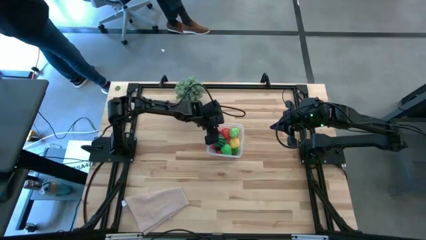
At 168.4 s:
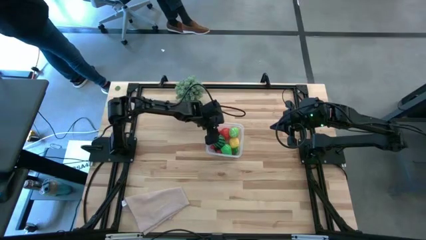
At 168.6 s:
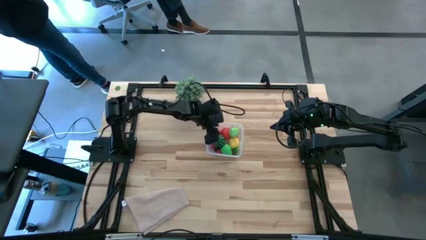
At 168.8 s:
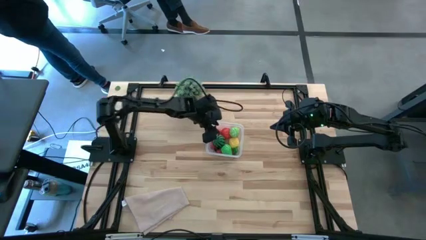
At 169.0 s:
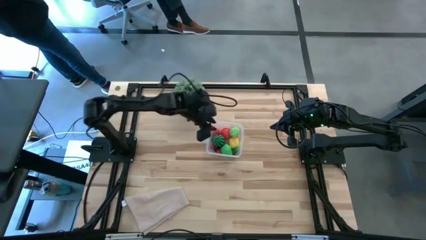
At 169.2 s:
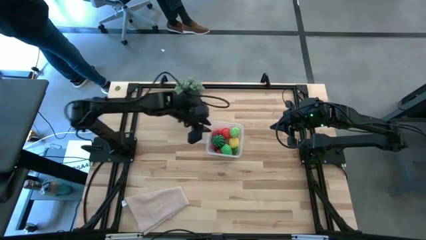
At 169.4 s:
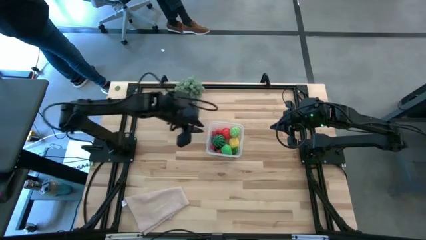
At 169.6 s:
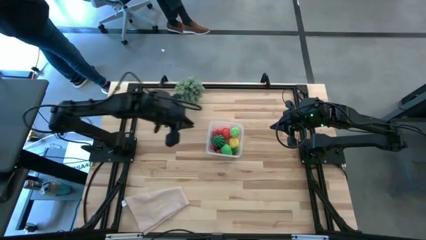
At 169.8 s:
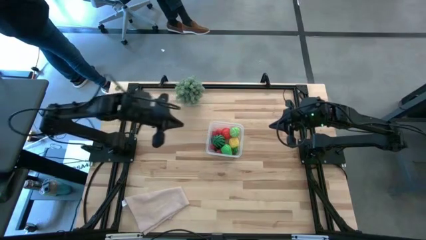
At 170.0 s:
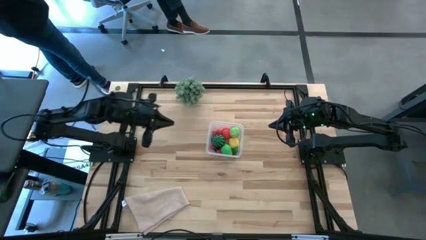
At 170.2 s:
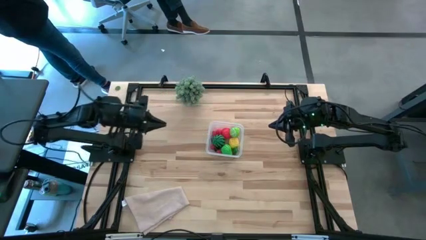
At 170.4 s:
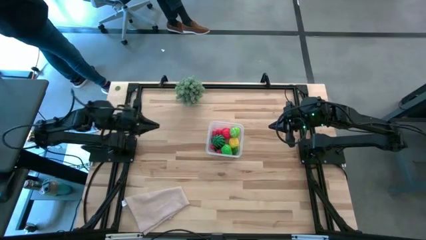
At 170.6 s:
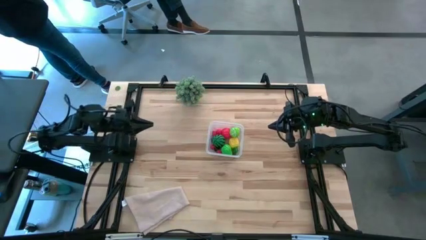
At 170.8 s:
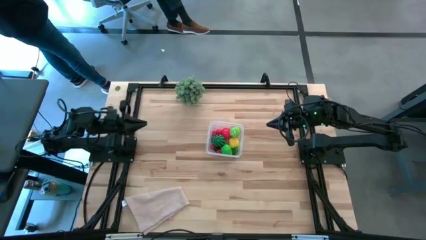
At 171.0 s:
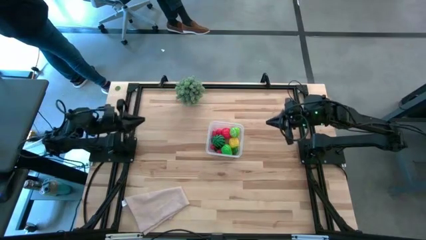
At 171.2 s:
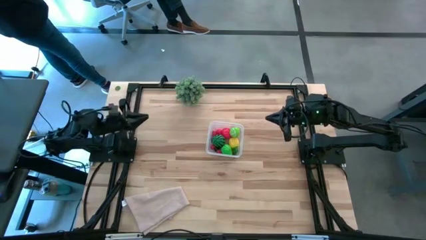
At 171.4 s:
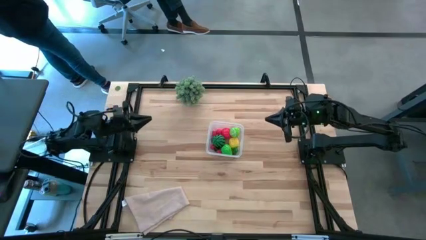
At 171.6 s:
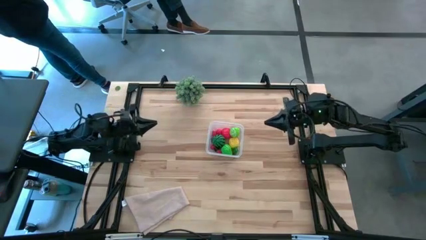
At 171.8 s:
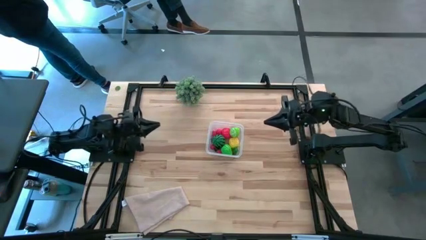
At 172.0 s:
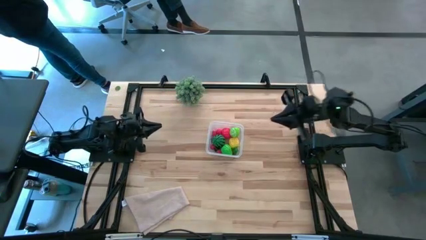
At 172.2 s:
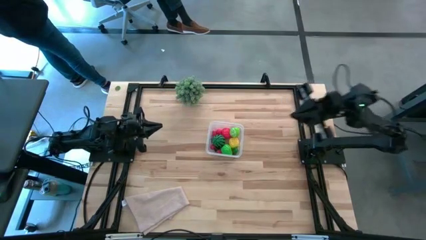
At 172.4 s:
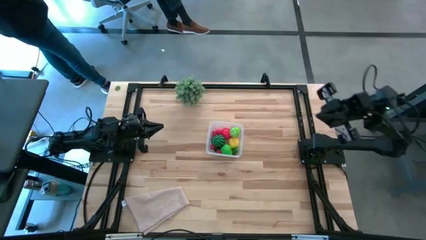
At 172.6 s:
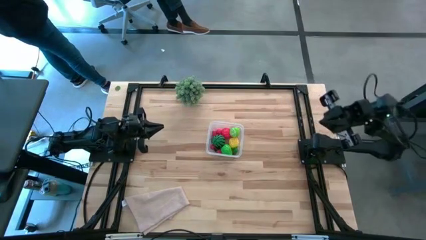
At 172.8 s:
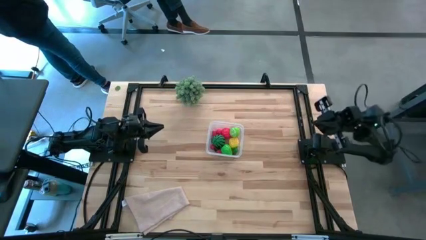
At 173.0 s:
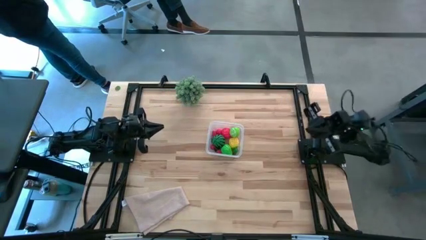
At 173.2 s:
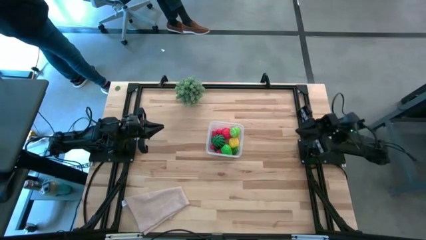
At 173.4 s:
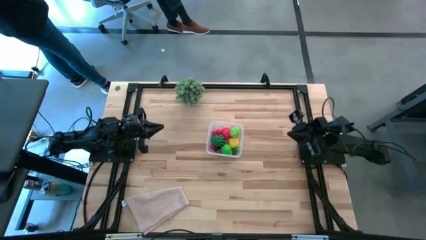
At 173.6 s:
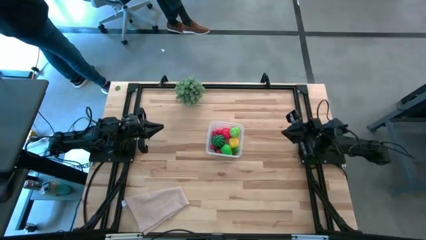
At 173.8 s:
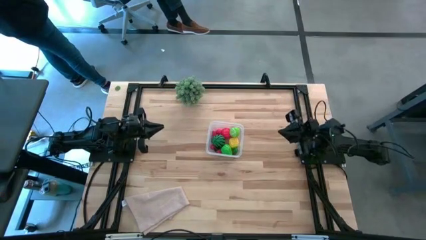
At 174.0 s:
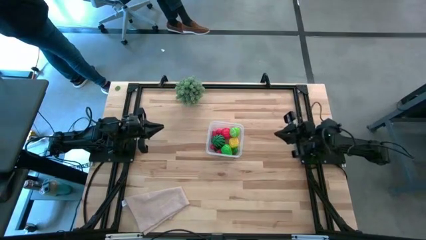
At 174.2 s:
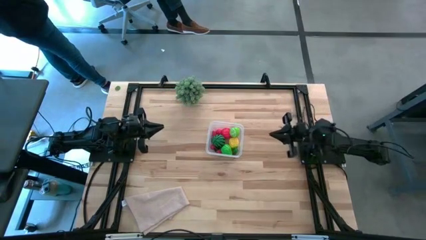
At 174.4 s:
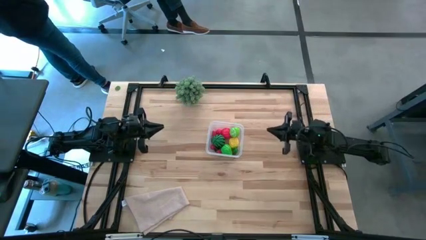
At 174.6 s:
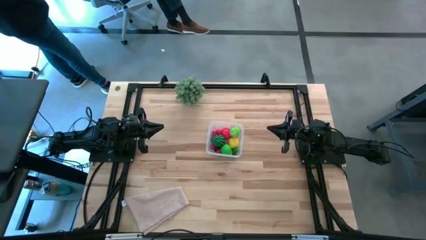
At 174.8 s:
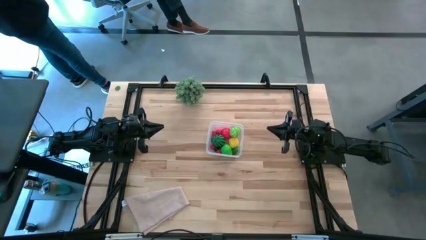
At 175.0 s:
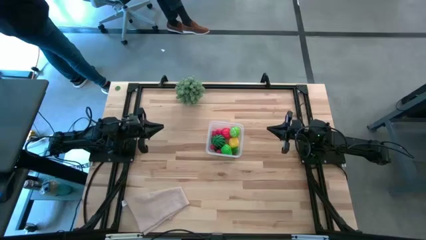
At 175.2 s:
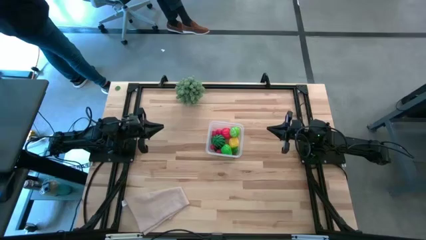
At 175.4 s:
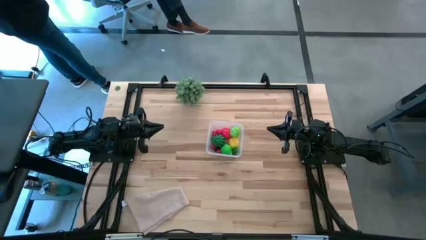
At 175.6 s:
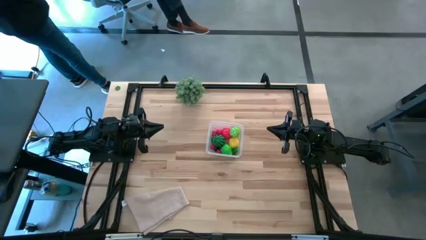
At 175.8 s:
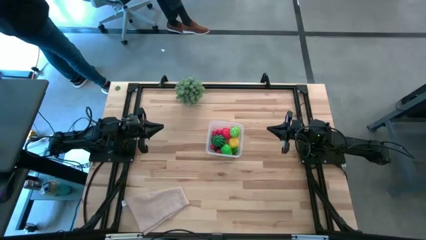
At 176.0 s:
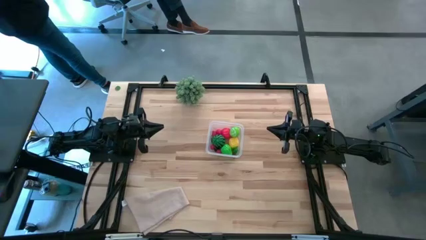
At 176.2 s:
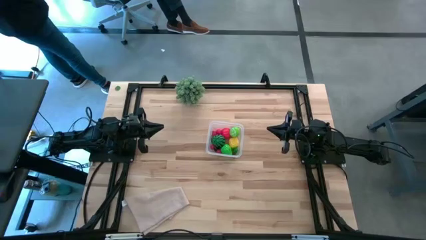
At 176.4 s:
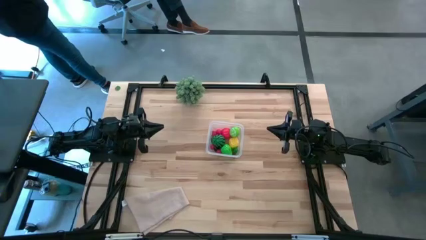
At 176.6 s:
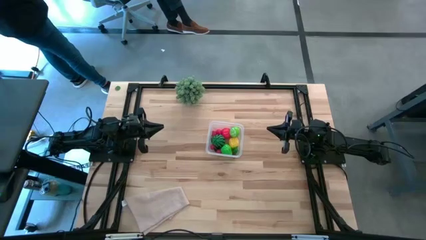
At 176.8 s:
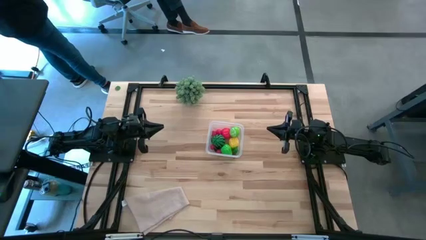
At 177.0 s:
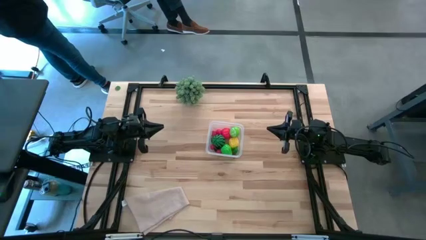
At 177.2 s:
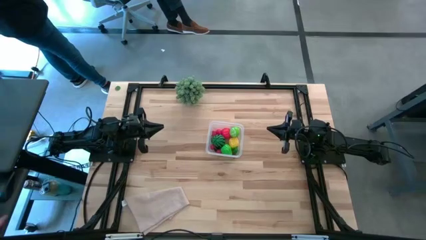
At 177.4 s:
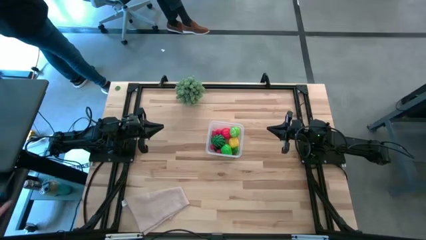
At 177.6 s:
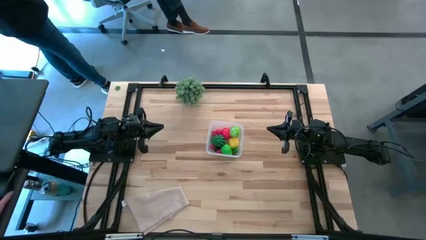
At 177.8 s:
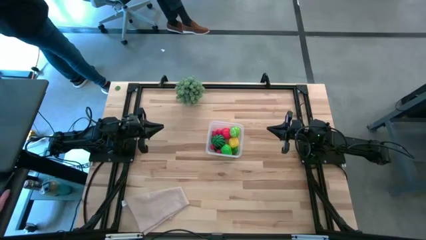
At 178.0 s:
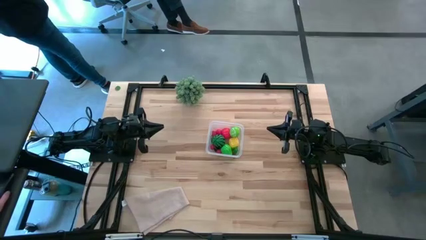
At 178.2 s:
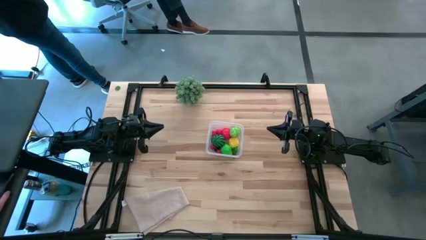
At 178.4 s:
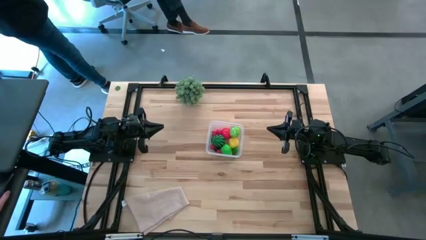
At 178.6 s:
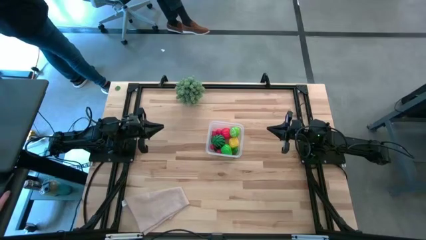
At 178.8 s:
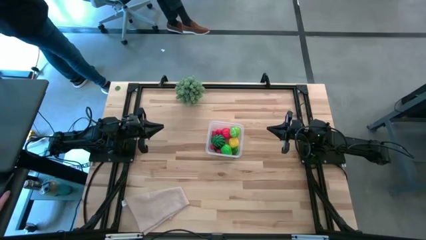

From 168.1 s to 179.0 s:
Task: Pick and placing Produce into tupperware
Return to Home Position

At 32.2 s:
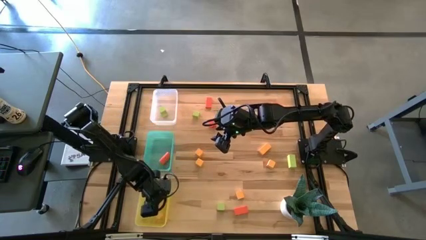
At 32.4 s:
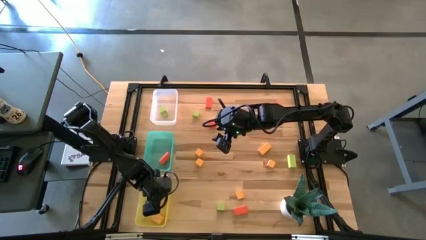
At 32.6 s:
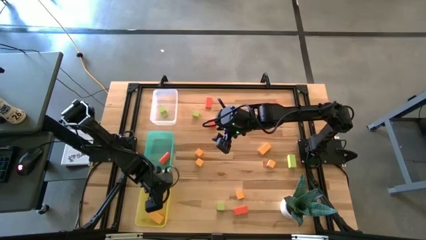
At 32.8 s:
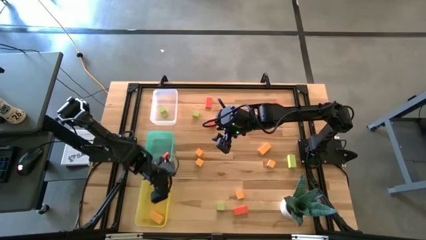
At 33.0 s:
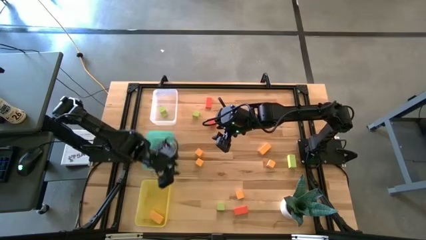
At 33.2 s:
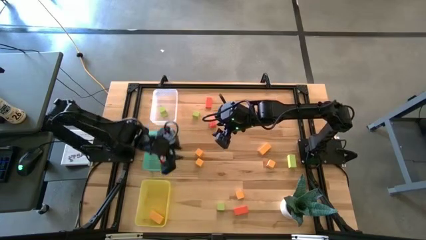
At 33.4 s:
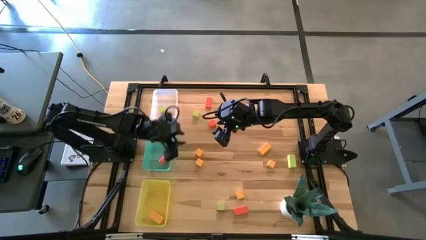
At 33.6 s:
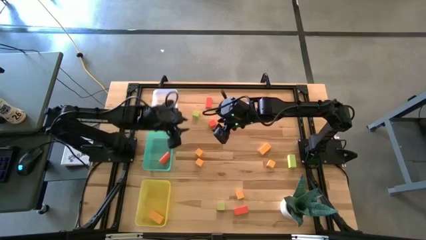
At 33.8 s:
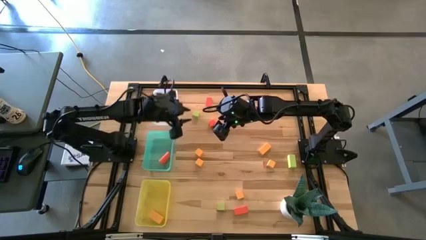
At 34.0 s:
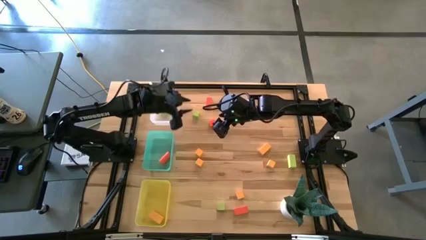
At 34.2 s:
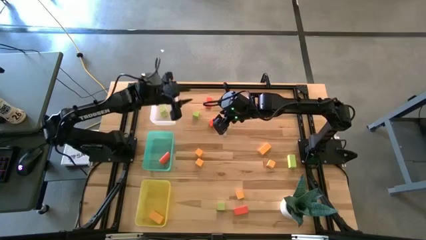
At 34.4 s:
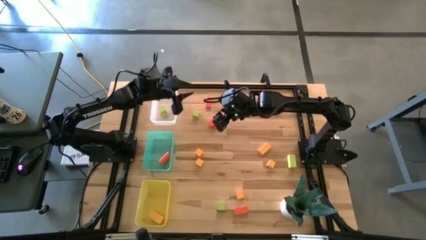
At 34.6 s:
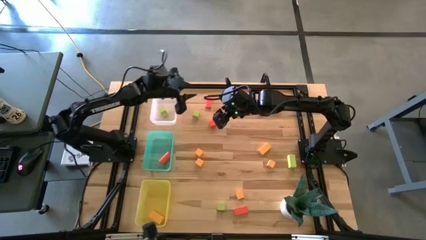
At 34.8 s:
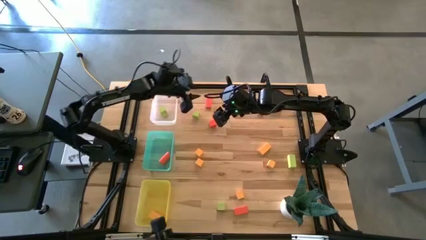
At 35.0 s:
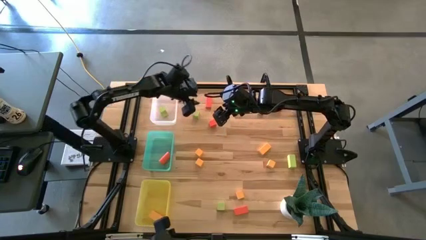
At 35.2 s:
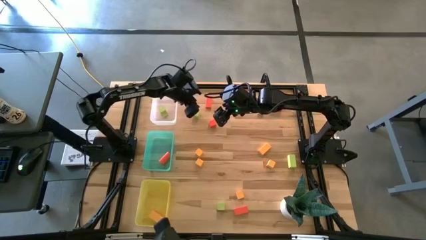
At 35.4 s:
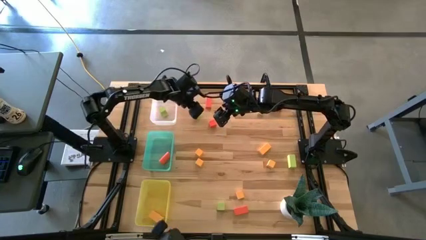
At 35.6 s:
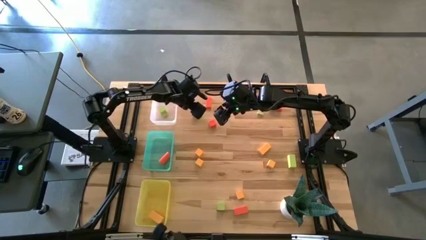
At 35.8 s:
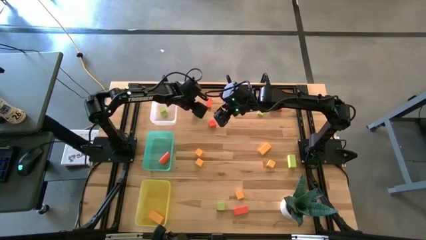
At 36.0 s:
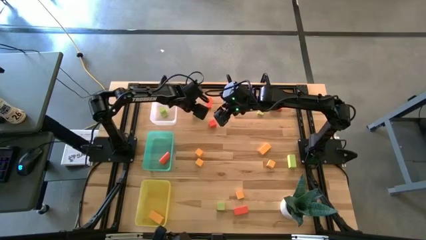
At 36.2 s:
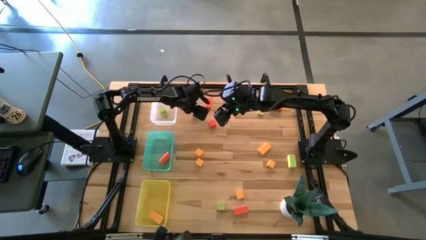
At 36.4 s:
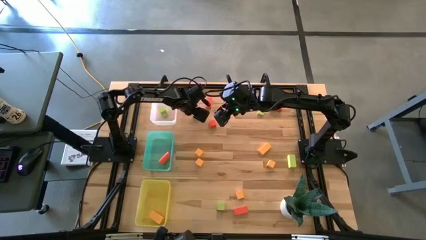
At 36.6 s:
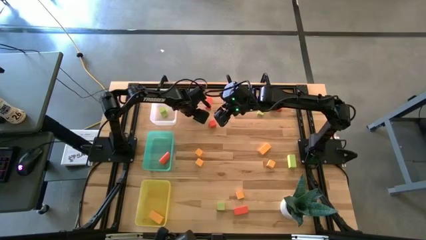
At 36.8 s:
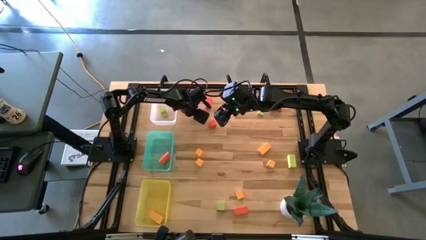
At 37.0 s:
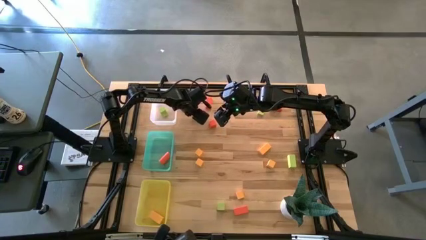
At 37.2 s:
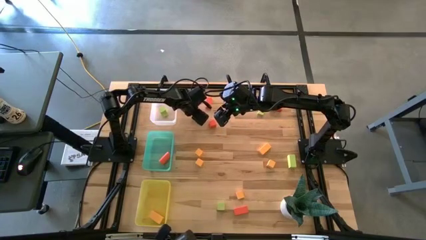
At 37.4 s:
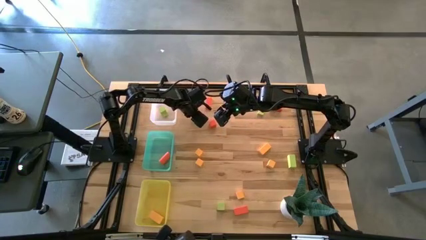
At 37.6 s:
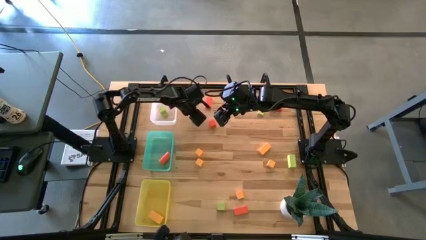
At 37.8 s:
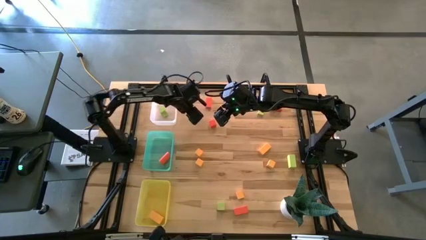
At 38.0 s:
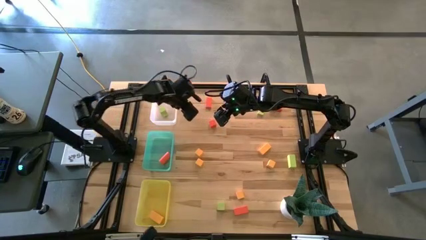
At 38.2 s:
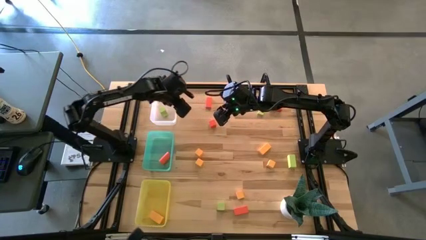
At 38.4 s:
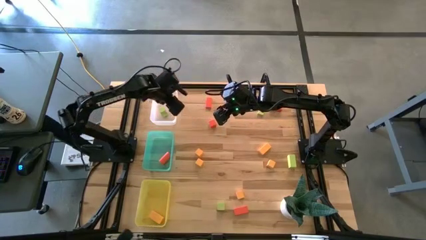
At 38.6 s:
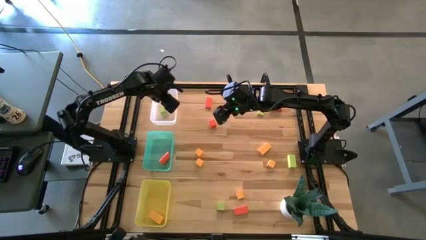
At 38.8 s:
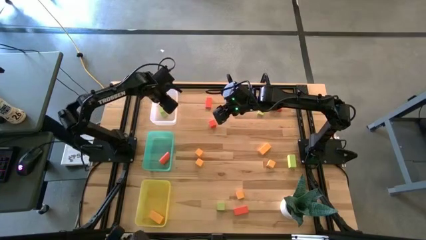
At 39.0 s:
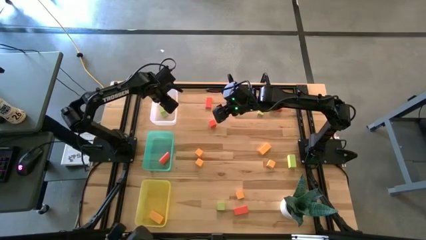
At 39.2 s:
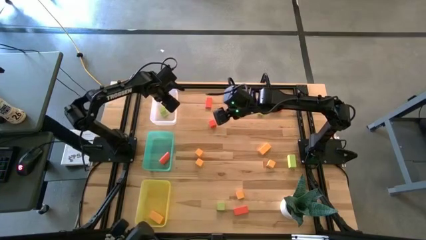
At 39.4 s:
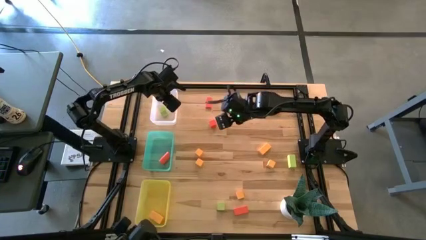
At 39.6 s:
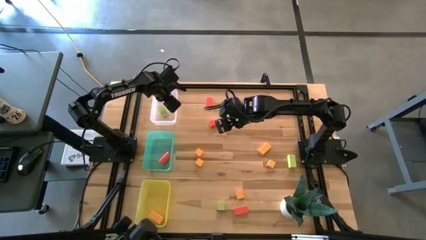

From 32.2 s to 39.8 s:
Task: Sort & place blocks by color
Put the green cube block into the transparent bin
